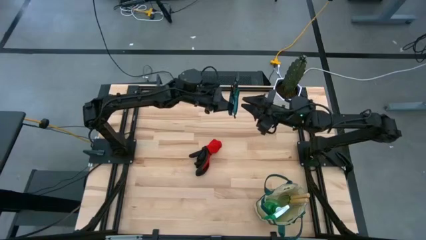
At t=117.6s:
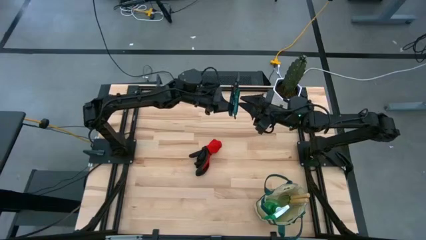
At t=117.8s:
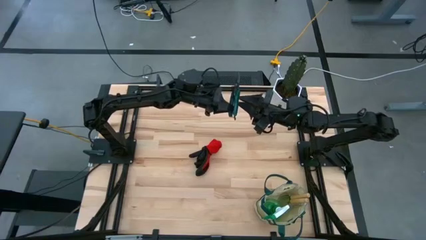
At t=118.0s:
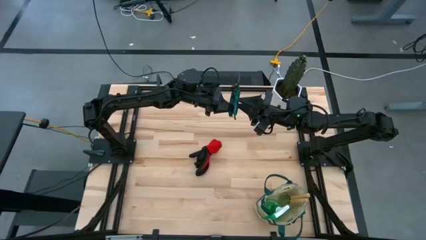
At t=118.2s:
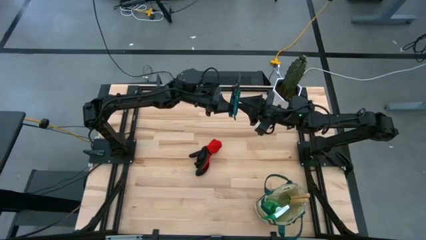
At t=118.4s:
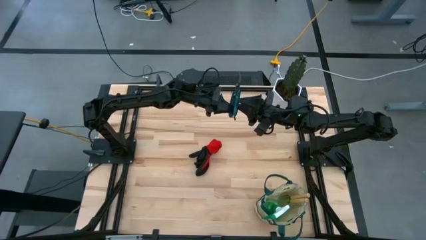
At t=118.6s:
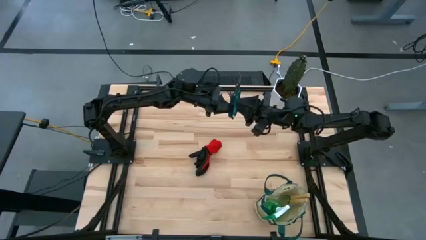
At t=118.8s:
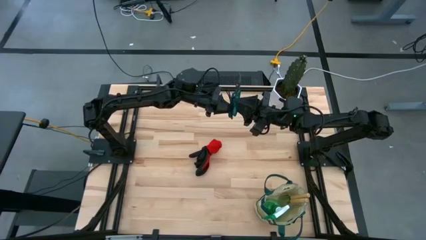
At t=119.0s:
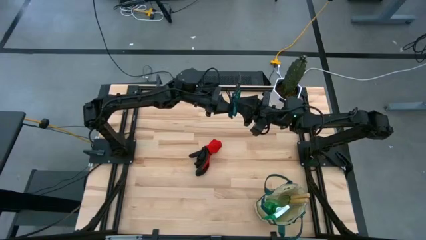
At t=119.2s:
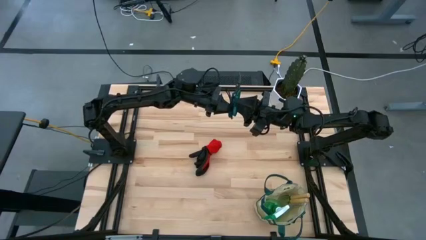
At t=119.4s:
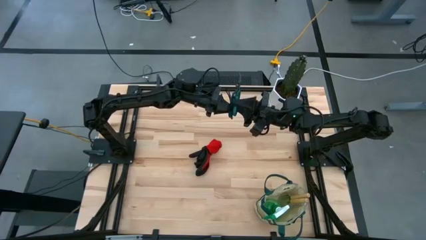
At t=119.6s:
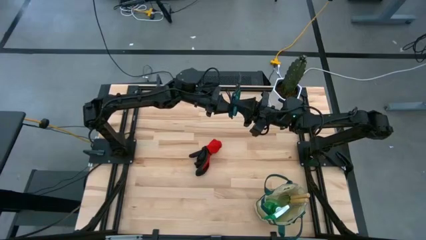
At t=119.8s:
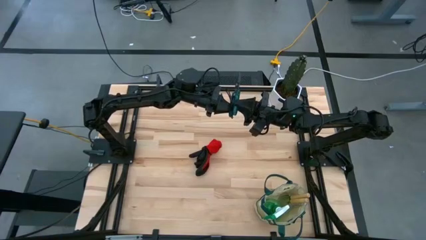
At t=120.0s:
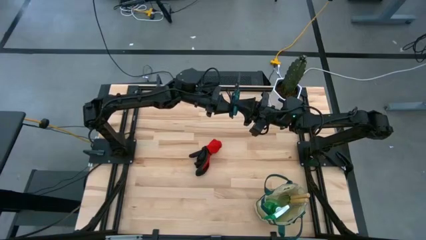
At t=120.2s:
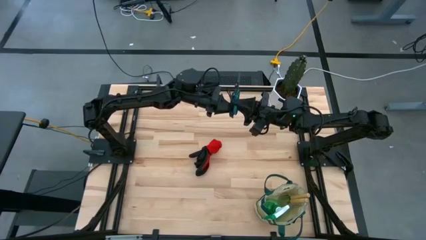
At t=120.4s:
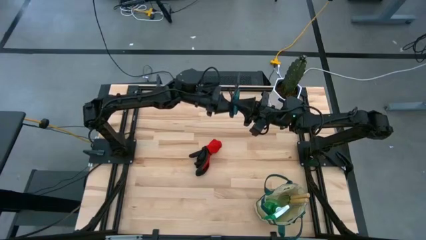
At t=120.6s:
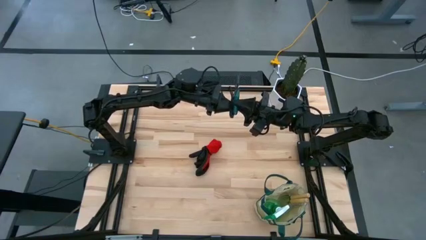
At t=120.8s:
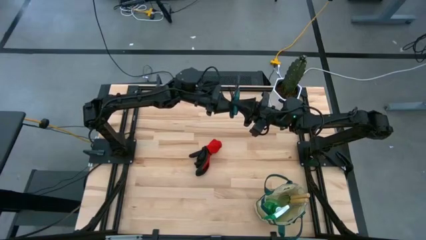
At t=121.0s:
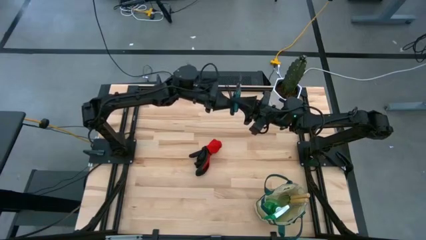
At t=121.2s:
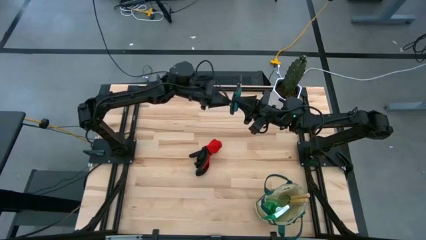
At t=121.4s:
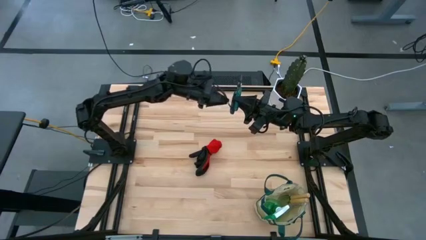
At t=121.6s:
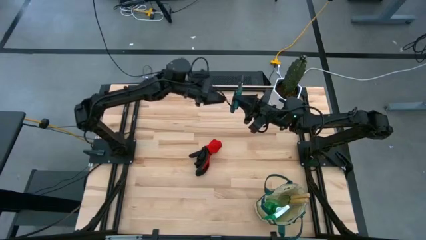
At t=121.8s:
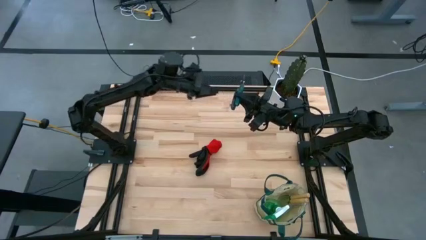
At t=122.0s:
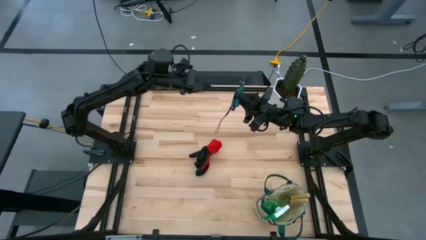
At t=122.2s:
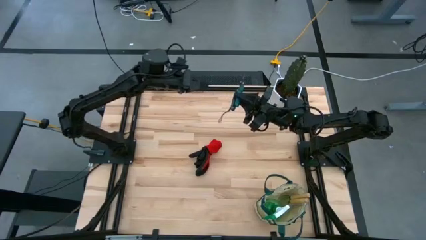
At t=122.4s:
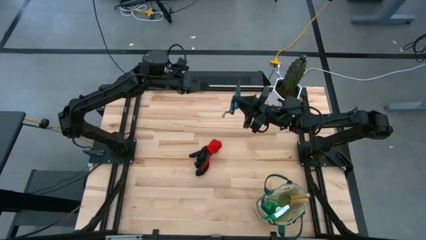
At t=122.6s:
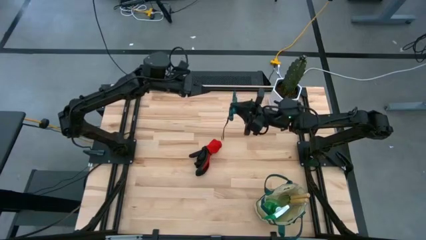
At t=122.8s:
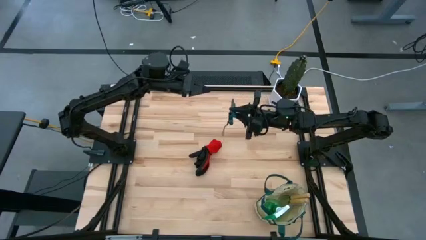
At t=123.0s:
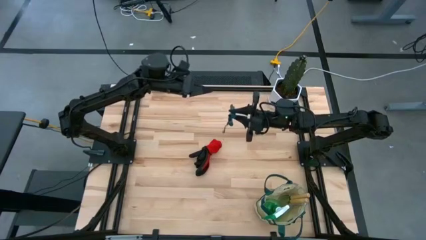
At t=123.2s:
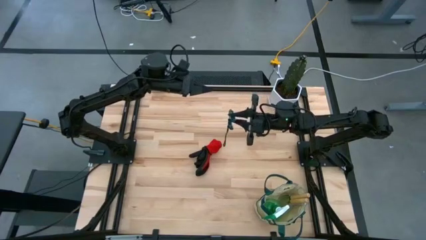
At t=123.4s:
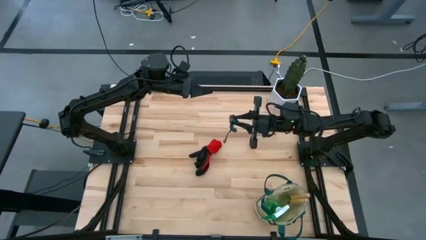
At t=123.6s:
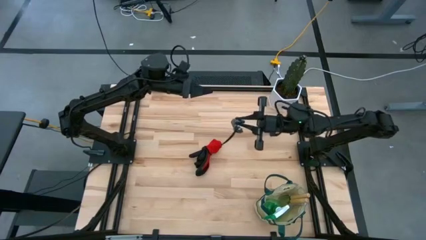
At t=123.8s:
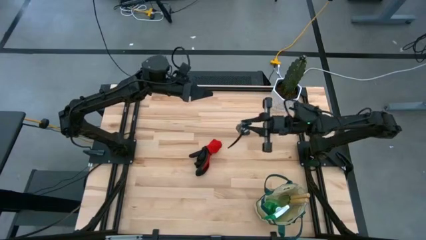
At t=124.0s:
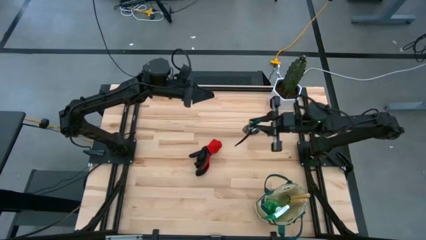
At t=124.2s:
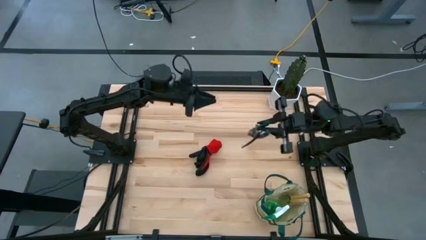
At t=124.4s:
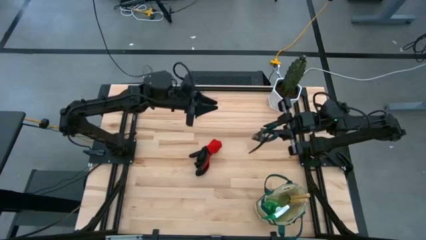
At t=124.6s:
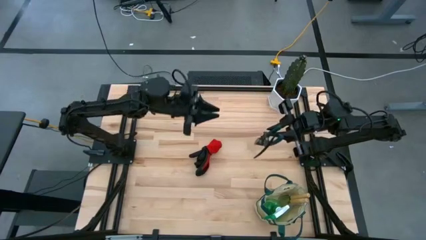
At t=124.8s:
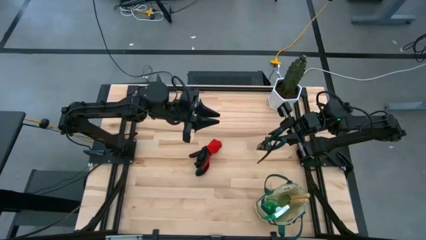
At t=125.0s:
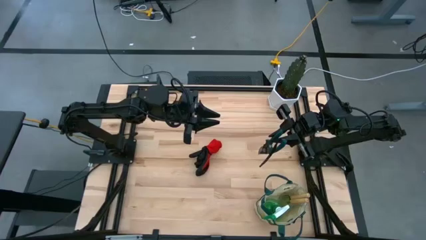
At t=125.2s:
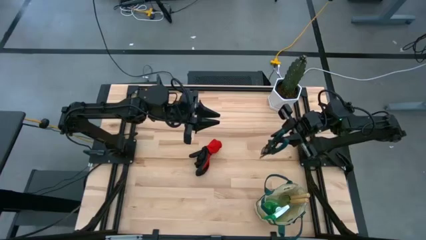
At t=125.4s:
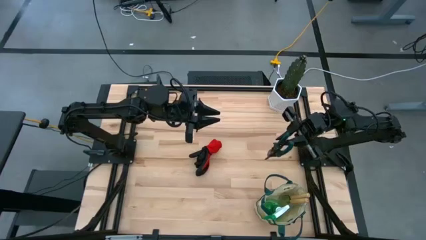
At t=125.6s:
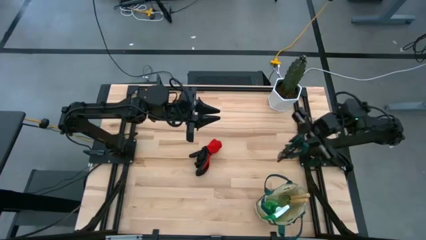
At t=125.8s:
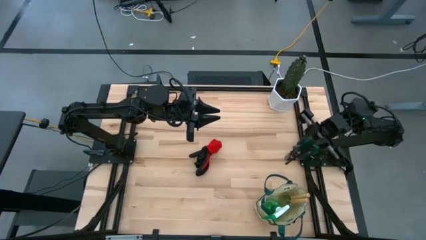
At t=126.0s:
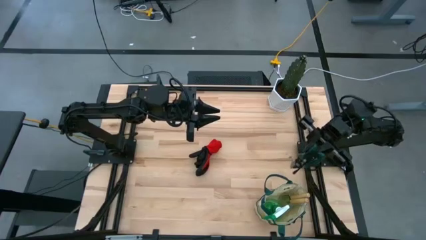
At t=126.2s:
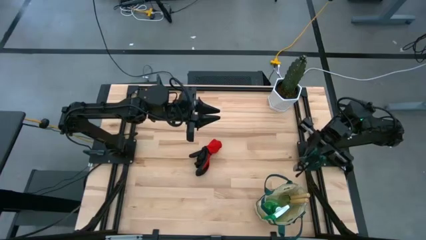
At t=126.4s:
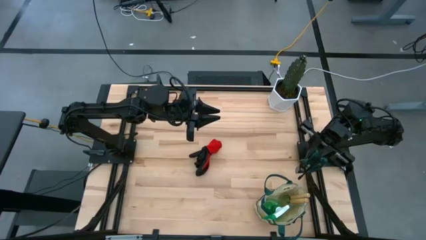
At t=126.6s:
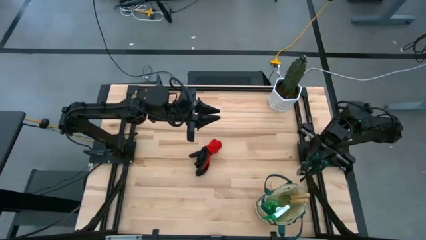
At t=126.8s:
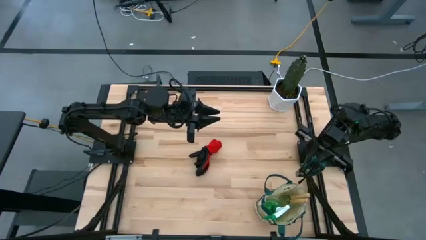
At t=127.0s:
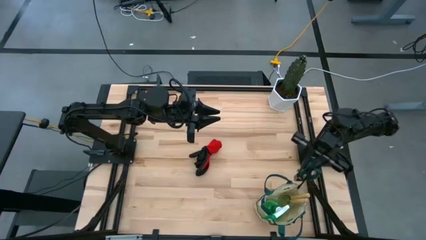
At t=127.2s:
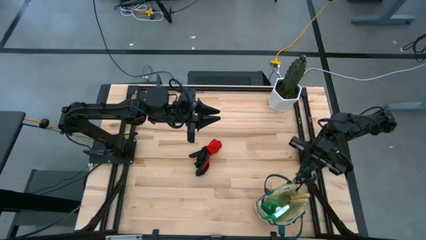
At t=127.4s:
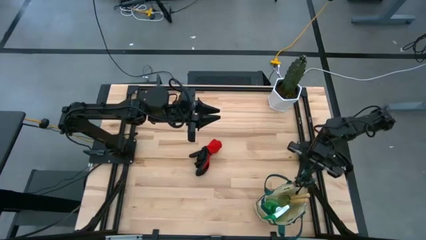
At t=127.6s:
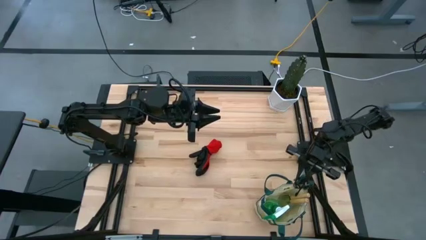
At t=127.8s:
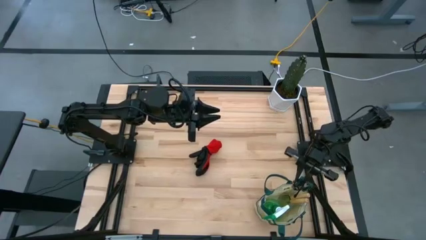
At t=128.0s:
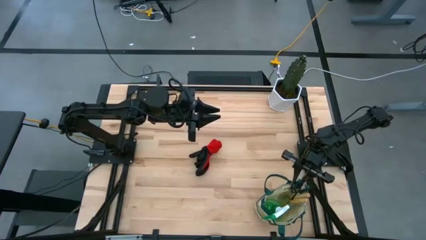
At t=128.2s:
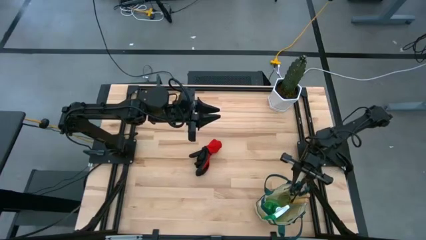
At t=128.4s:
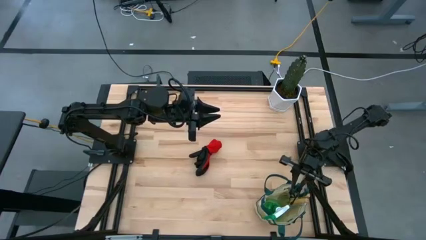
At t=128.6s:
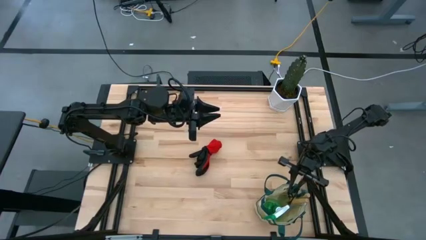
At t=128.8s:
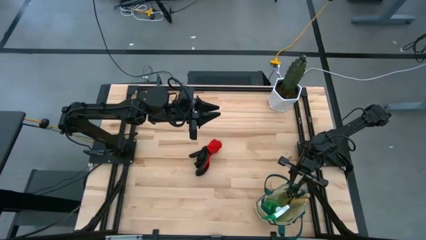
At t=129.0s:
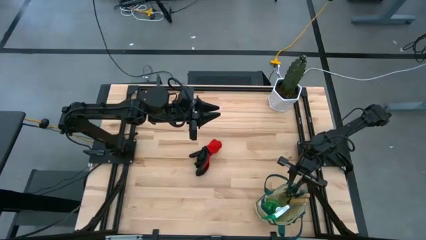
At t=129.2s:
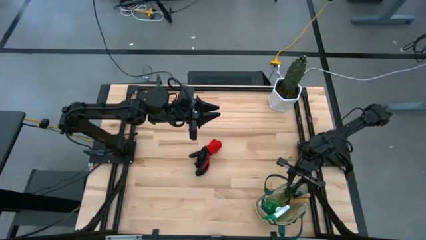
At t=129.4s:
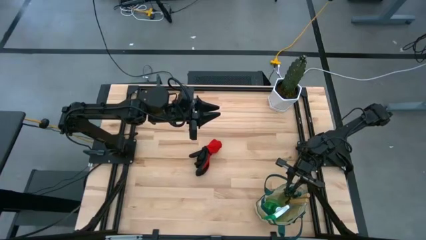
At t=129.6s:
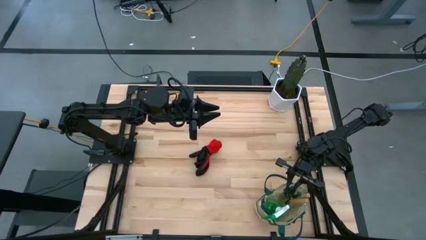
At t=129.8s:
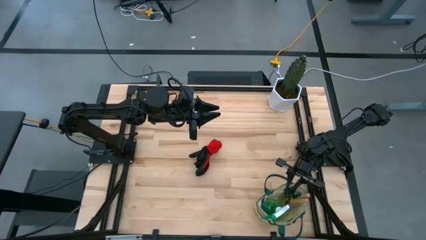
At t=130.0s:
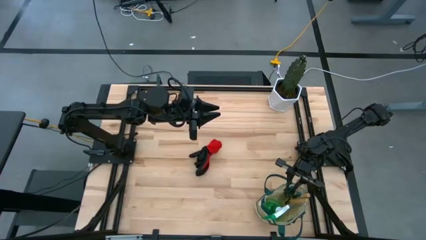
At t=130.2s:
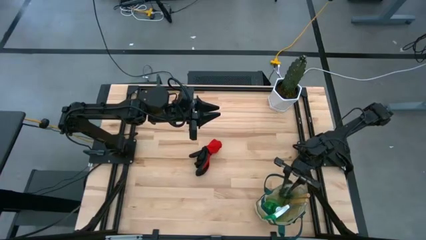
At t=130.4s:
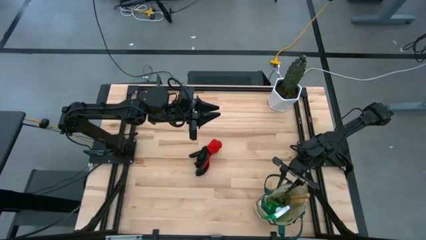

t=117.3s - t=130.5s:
Task: Pick & Place Garden tools in Gardening bag
Put the green shear scissors into the gardening tool bag

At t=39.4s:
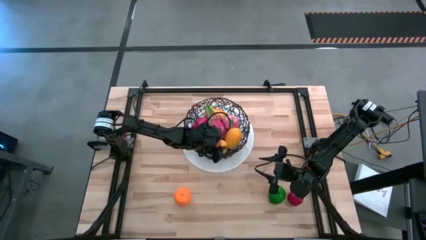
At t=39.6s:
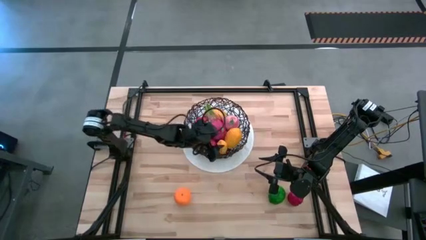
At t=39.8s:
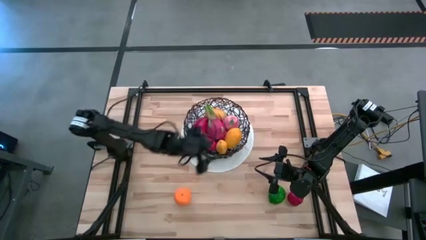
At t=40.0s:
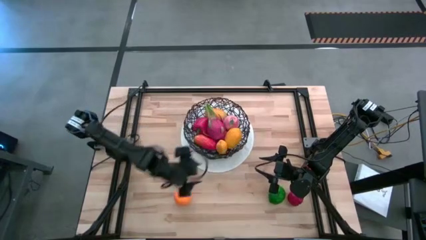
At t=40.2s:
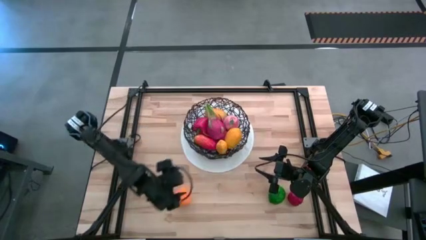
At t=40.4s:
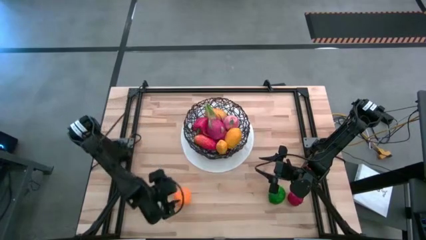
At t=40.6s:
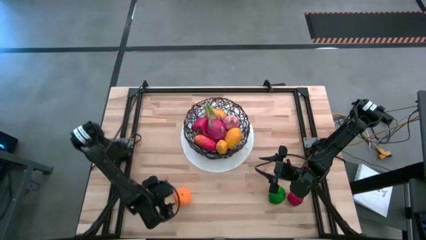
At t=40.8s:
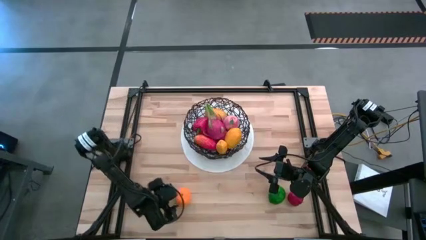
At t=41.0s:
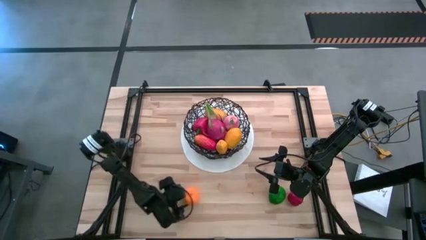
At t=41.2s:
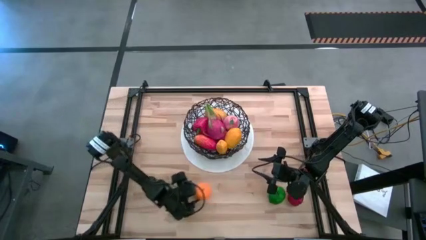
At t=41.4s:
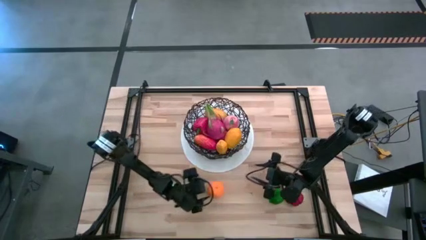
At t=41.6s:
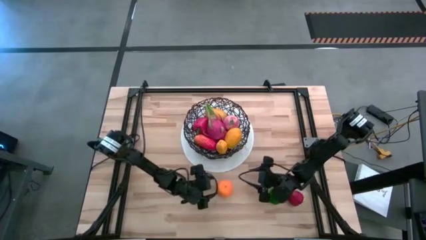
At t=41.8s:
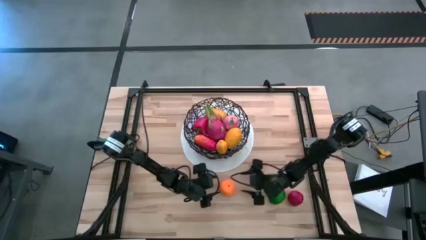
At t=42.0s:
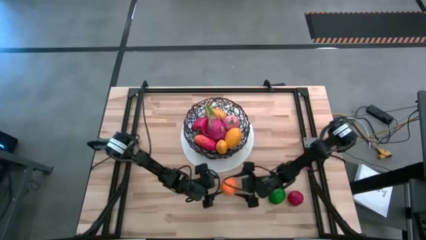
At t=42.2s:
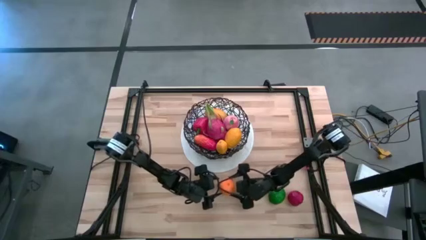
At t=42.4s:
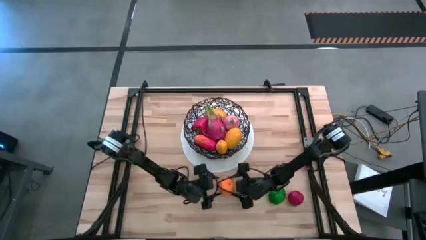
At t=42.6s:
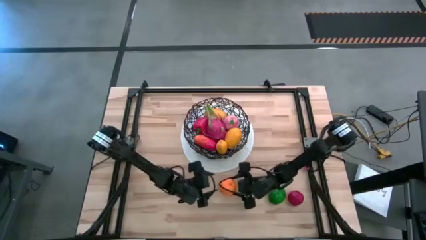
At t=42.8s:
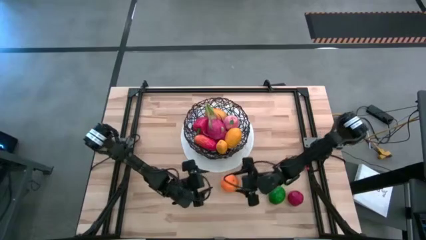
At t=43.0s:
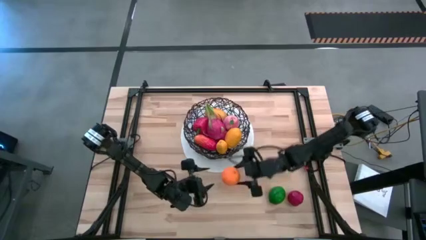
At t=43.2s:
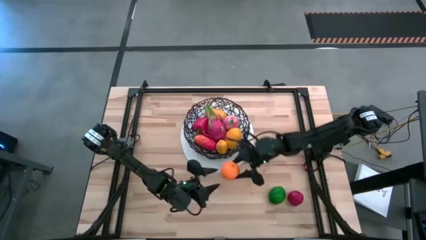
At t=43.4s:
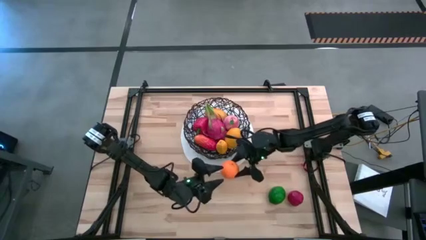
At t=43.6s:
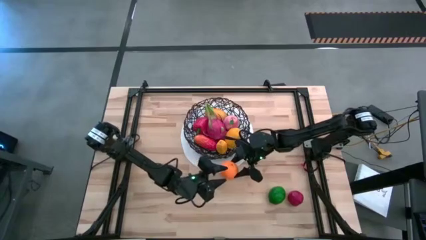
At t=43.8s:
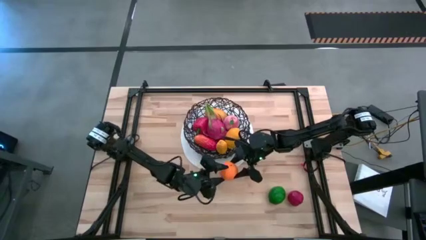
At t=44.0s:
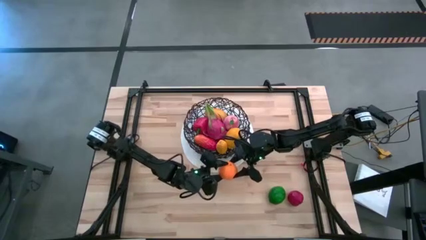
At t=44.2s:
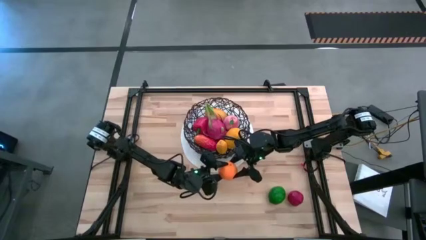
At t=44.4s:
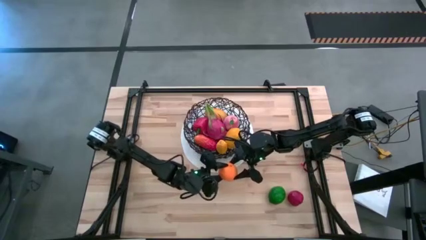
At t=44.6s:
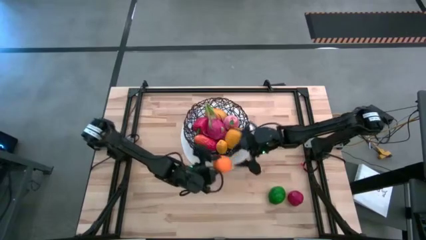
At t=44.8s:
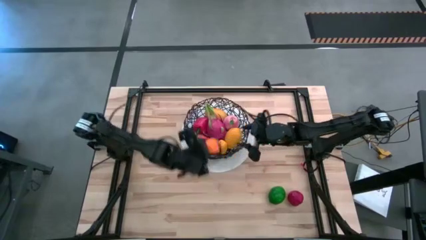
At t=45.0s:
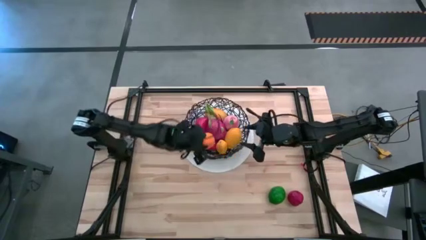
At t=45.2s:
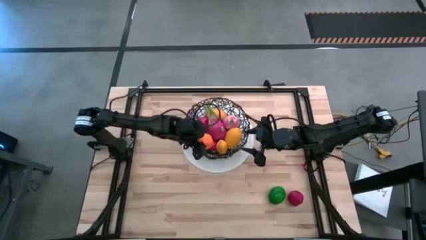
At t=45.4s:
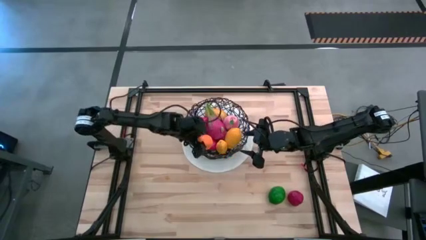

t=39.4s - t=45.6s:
Task: Build produce basket
Put the orange into the wire basket
